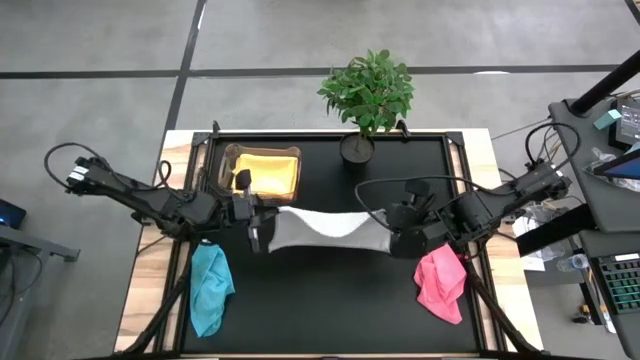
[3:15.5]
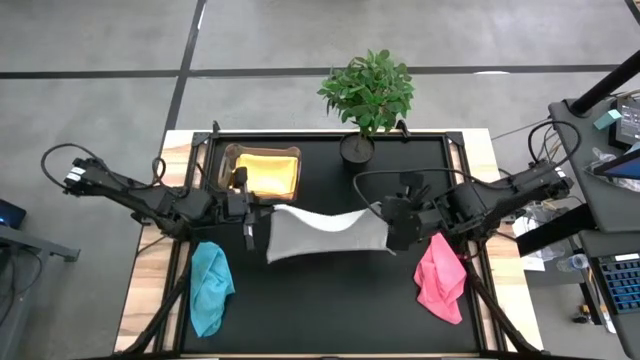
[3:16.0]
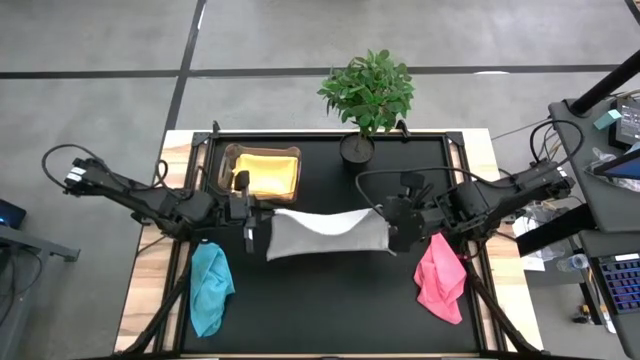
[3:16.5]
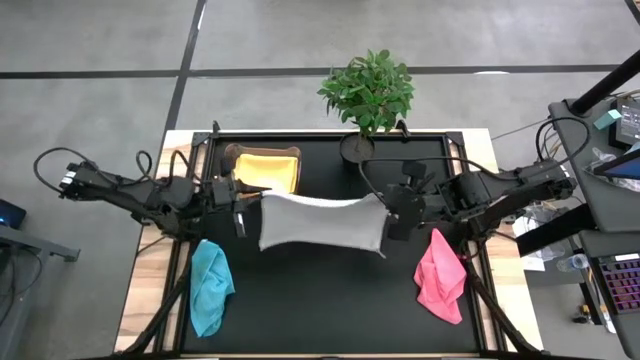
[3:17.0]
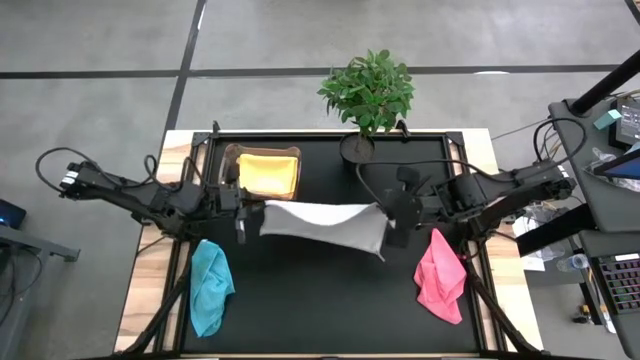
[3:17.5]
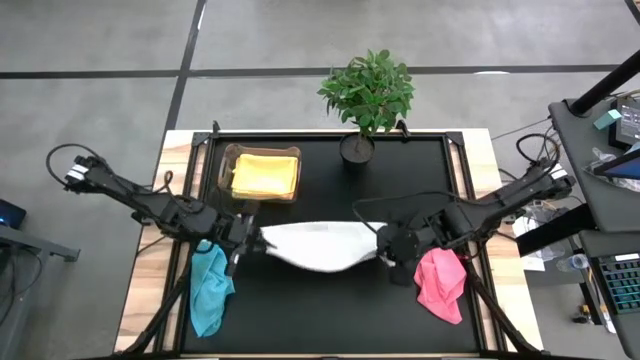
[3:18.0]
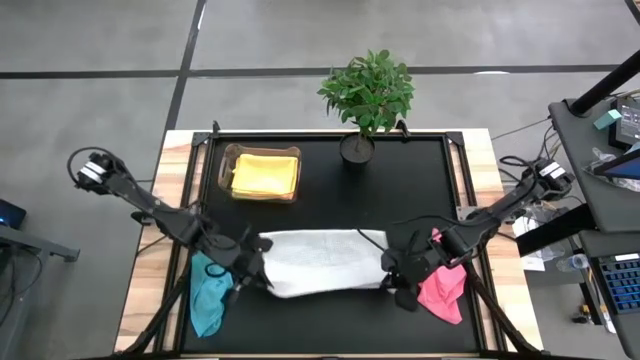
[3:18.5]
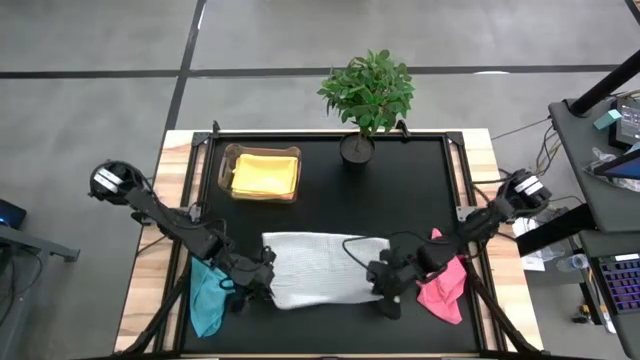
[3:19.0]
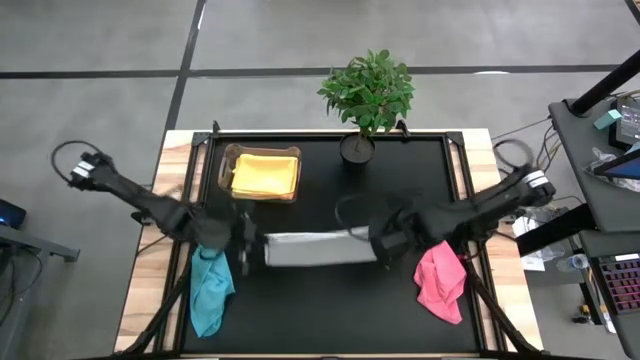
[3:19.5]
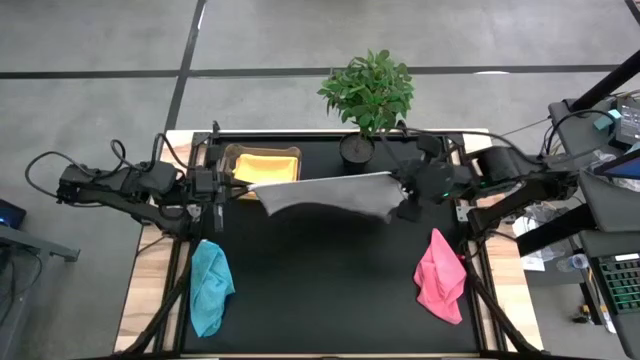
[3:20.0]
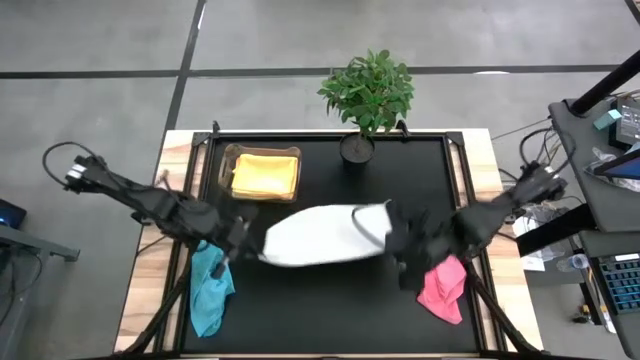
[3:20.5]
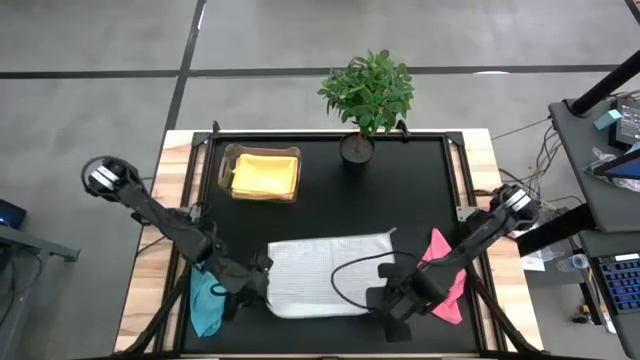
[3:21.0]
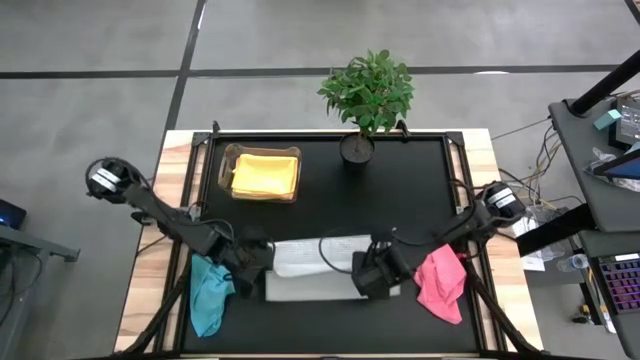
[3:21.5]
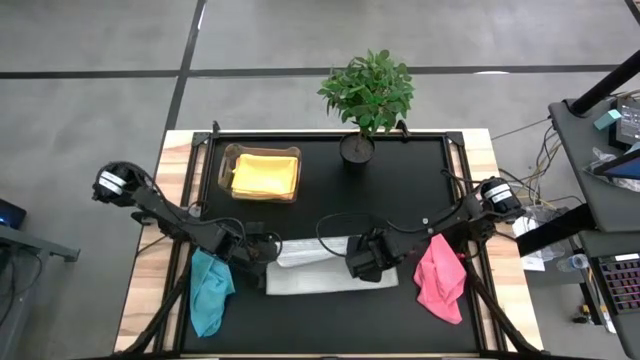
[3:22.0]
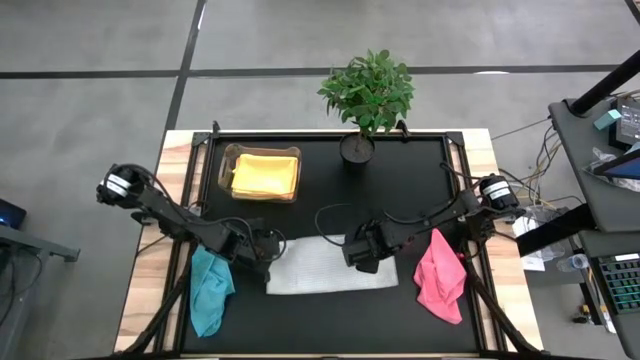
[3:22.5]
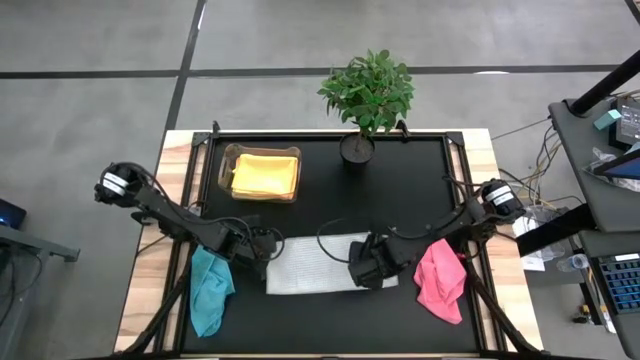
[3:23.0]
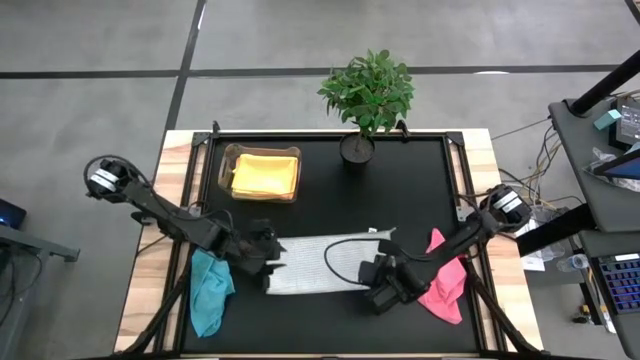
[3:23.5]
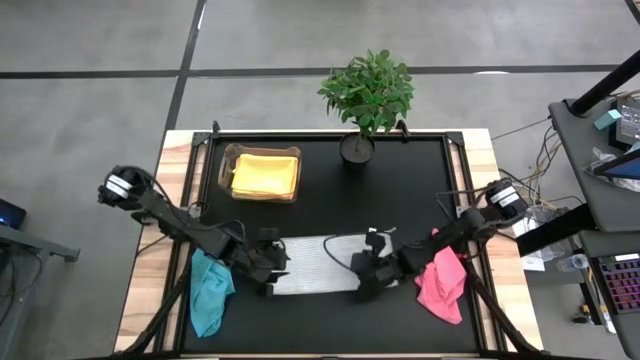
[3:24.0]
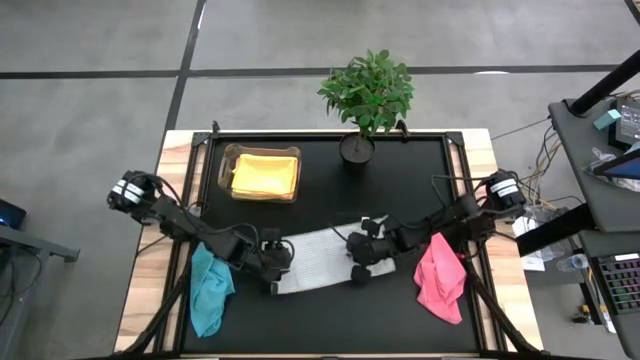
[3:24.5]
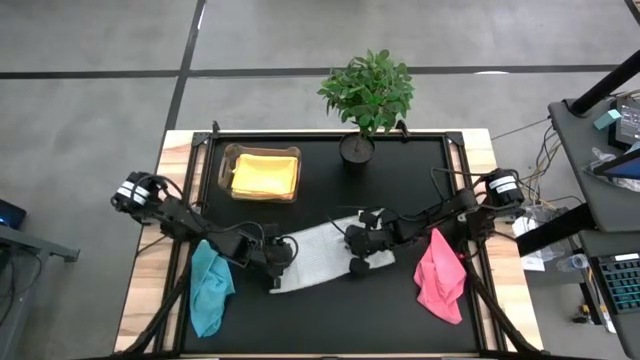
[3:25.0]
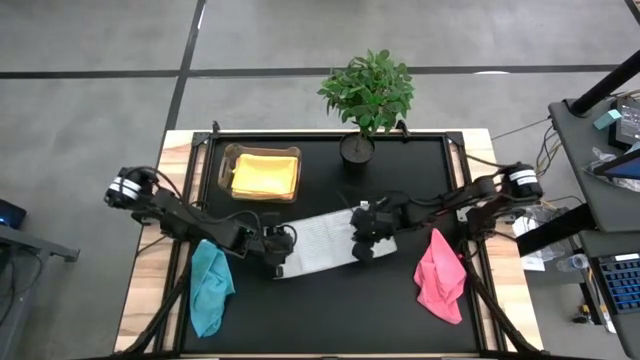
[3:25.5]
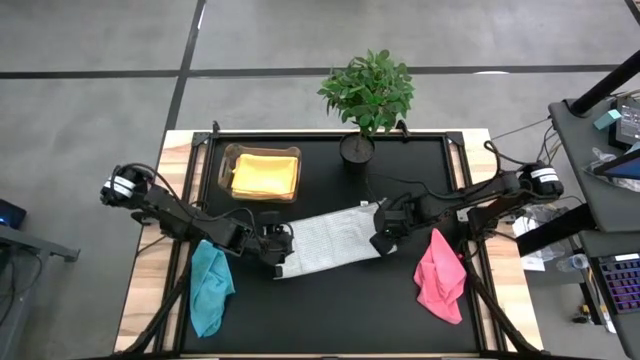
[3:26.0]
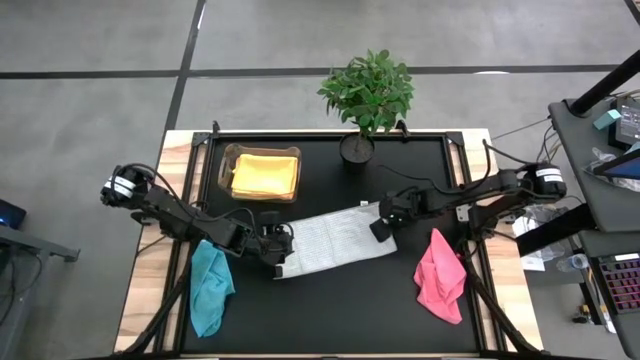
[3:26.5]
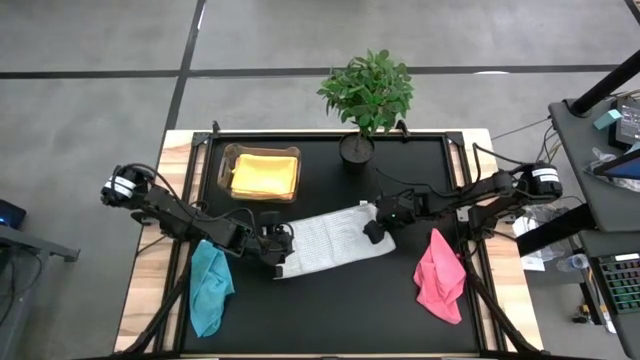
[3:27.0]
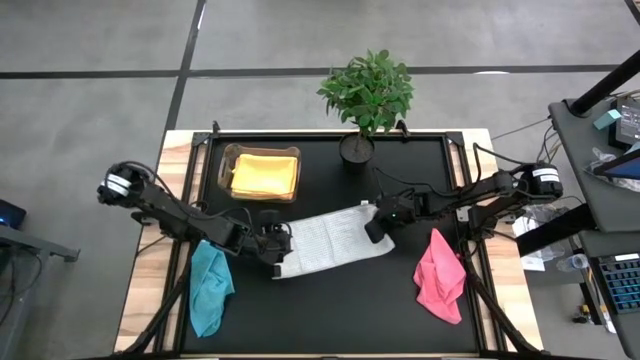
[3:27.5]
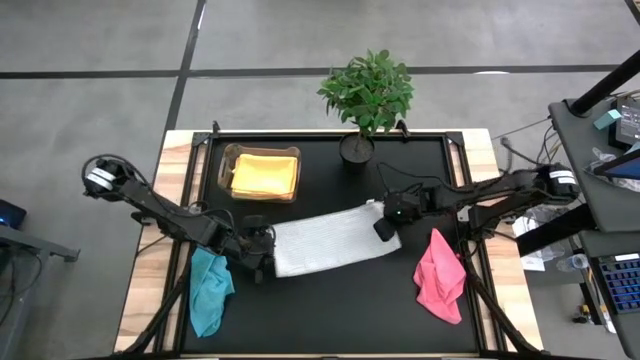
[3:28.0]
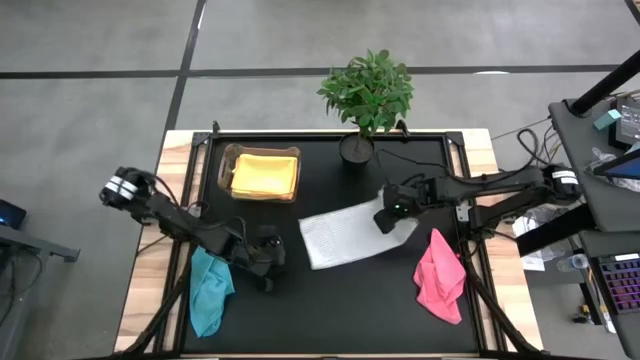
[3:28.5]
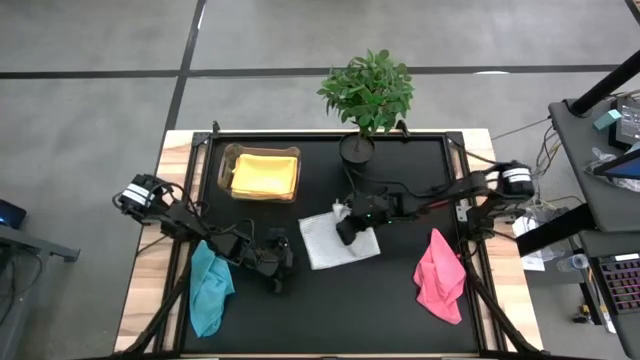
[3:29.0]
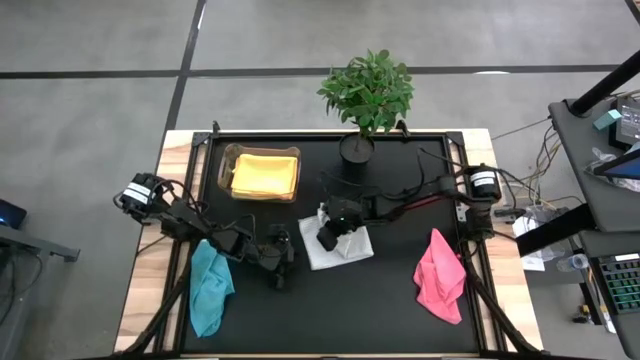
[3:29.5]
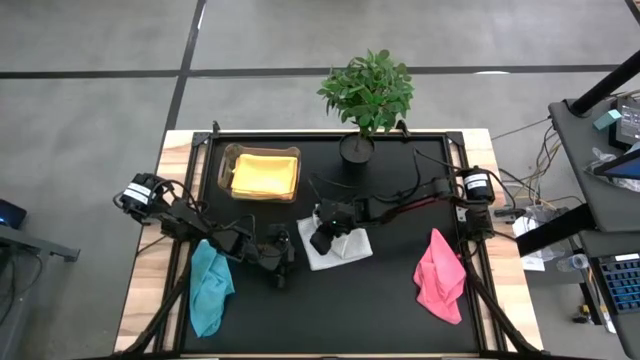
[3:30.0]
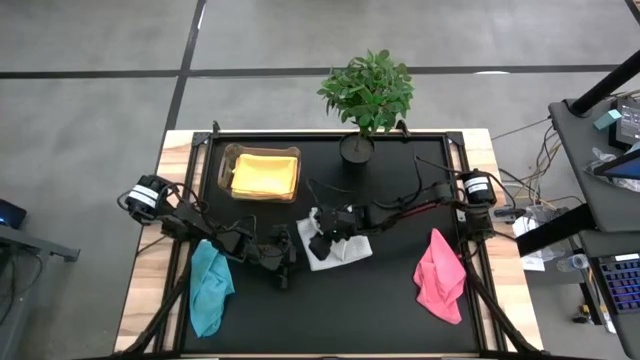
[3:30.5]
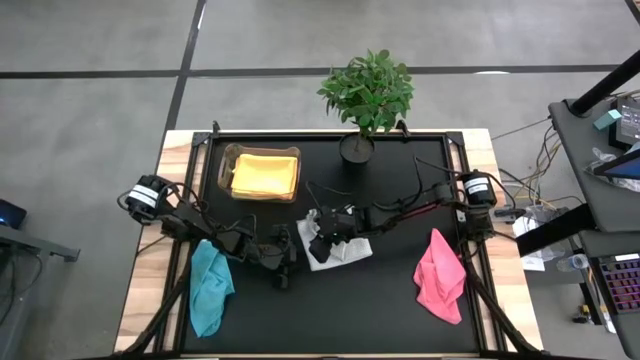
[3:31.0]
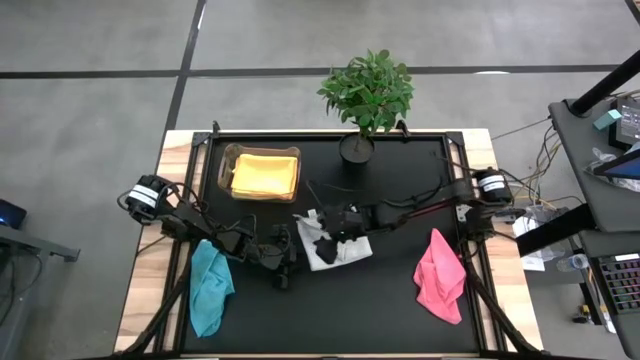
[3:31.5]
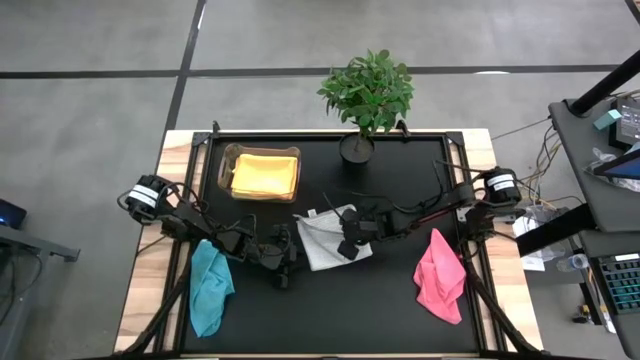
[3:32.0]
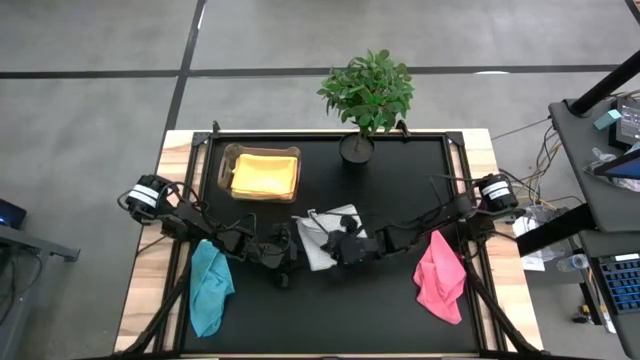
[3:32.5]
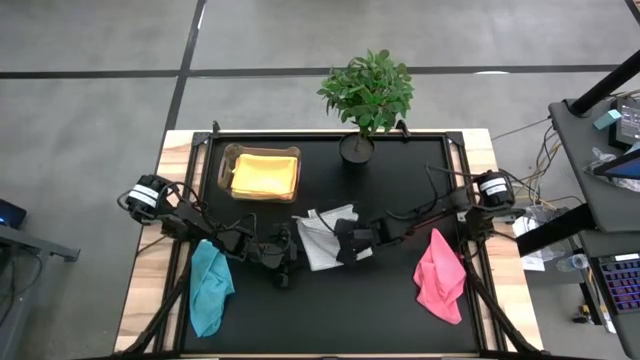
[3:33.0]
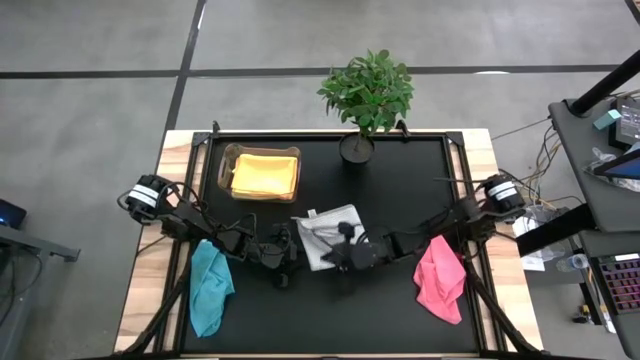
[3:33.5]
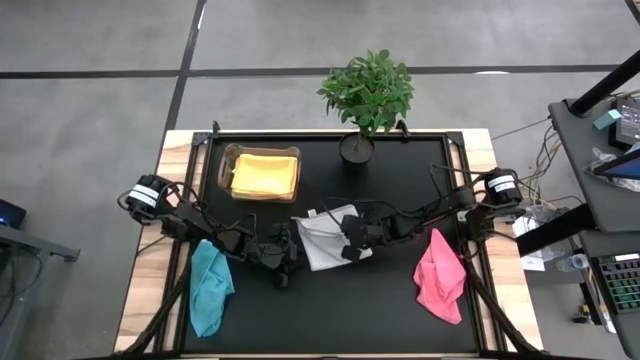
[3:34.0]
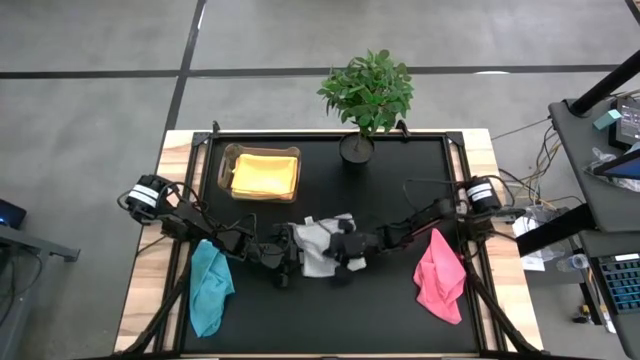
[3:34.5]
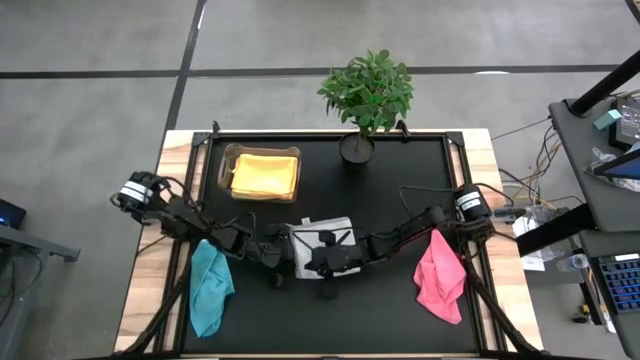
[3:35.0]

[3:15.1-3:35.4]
Task: Fold microfiber towels
Fold the gray towel
